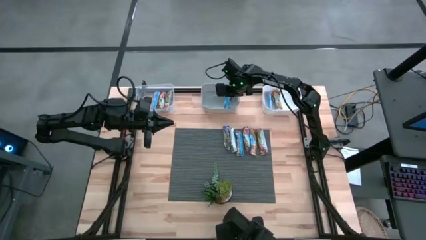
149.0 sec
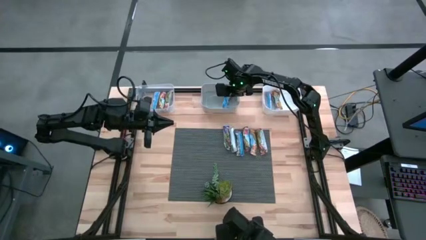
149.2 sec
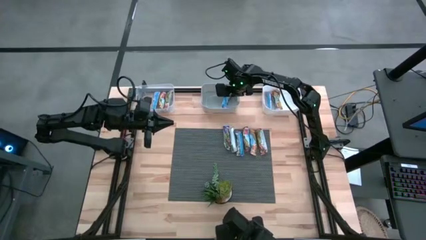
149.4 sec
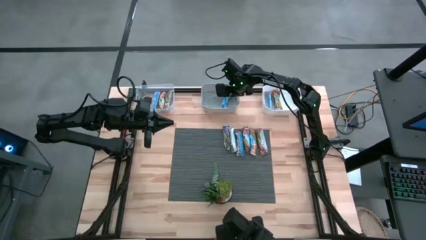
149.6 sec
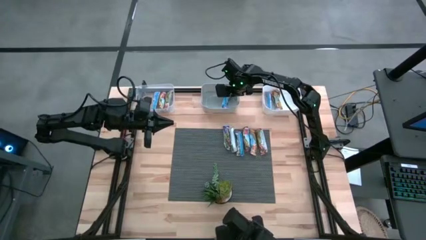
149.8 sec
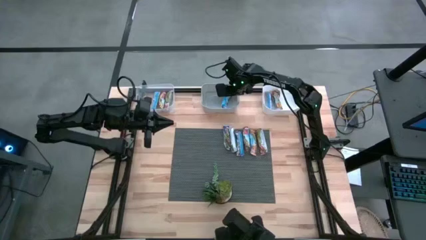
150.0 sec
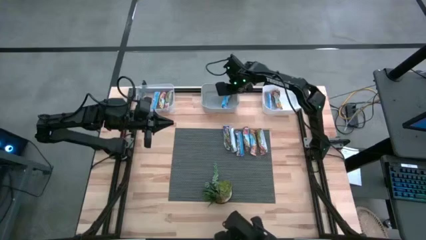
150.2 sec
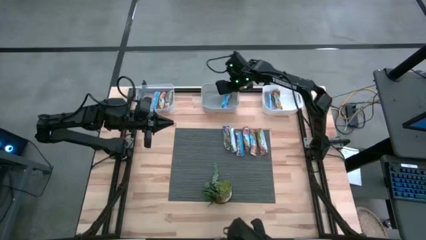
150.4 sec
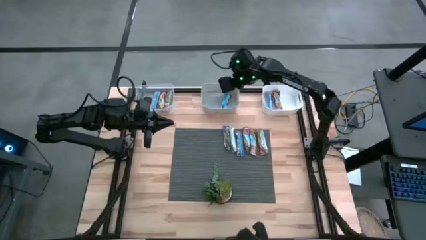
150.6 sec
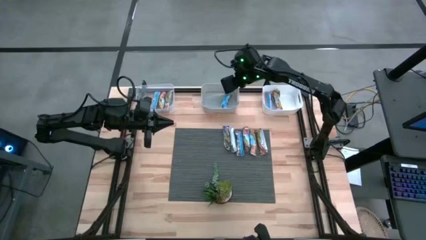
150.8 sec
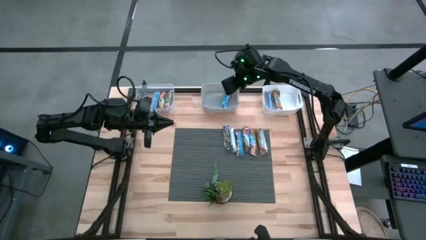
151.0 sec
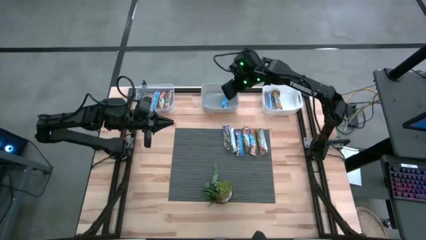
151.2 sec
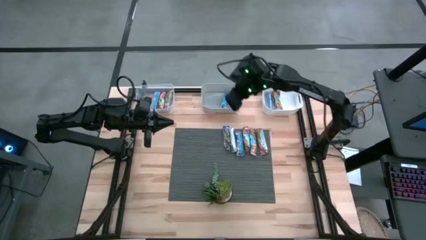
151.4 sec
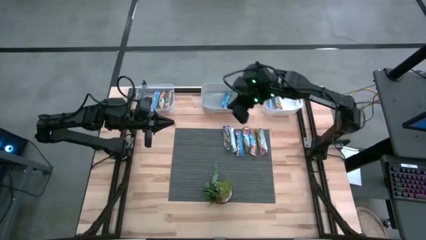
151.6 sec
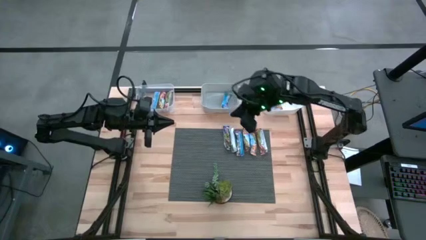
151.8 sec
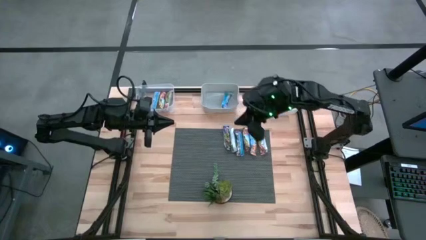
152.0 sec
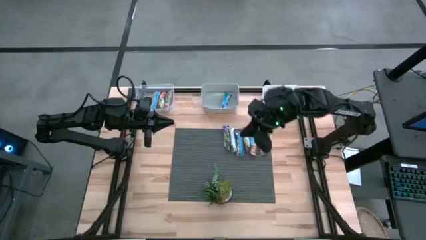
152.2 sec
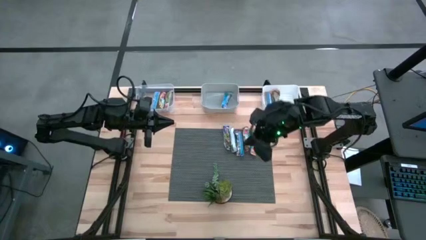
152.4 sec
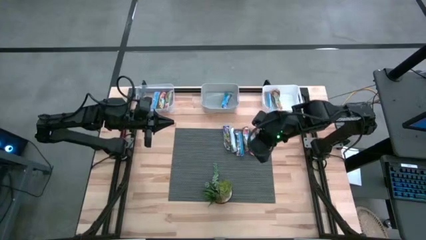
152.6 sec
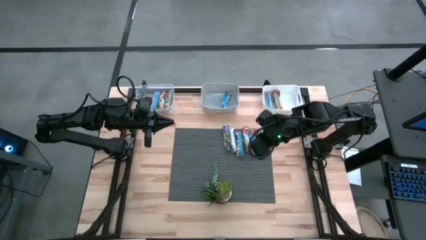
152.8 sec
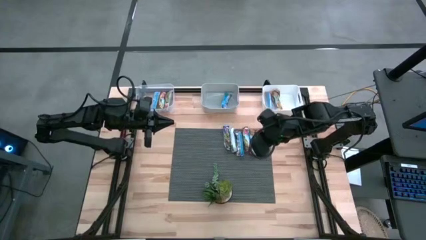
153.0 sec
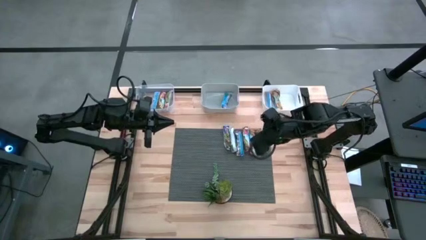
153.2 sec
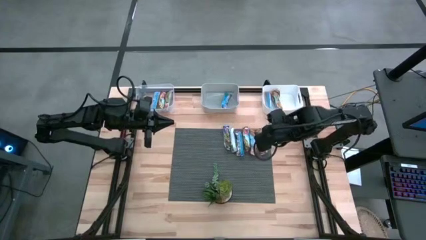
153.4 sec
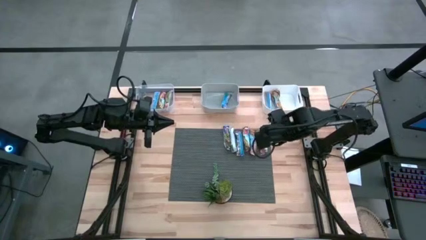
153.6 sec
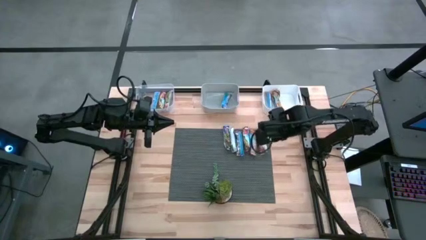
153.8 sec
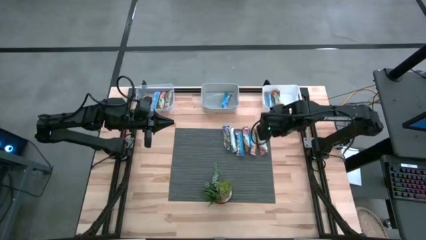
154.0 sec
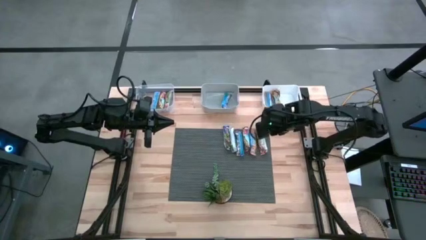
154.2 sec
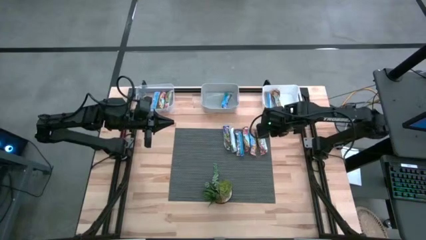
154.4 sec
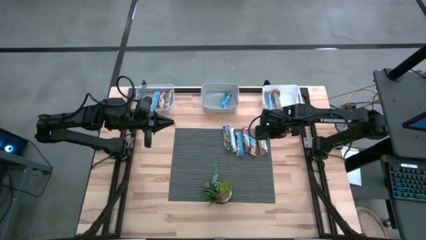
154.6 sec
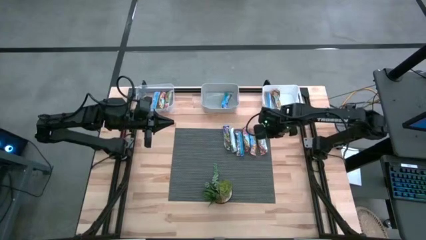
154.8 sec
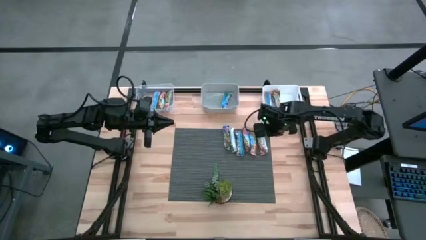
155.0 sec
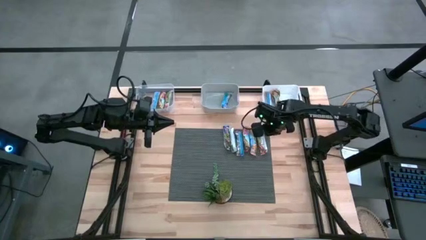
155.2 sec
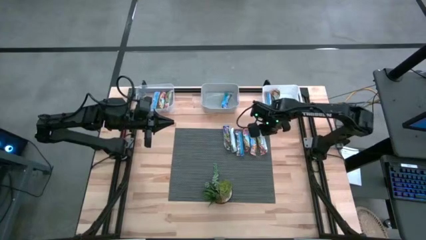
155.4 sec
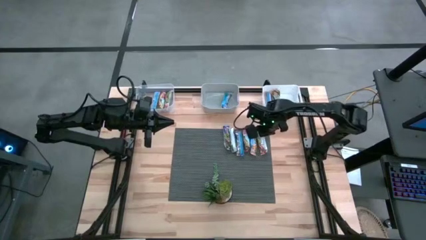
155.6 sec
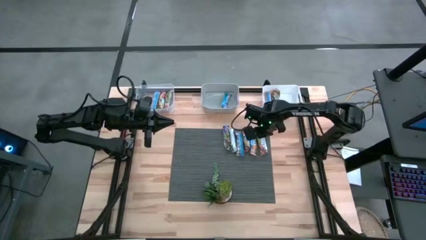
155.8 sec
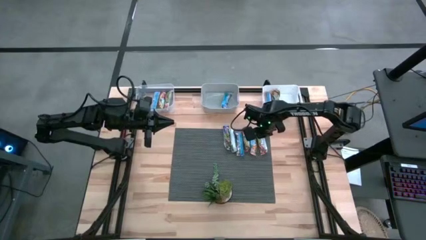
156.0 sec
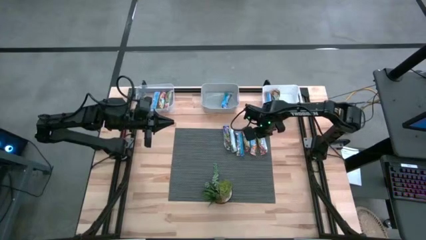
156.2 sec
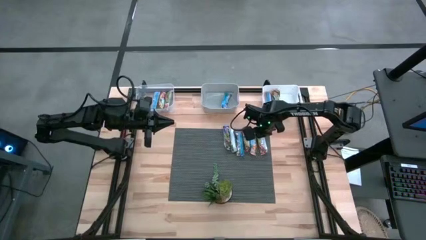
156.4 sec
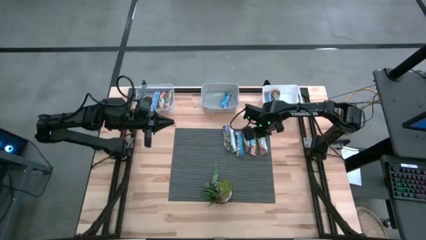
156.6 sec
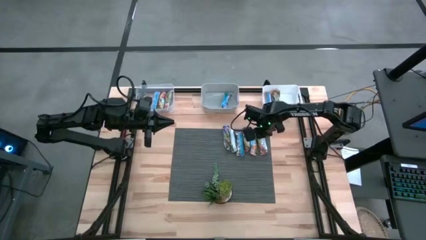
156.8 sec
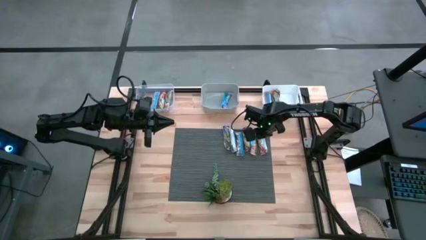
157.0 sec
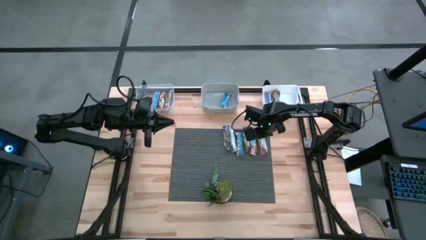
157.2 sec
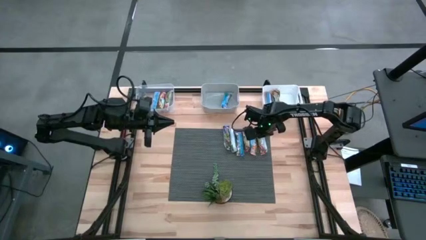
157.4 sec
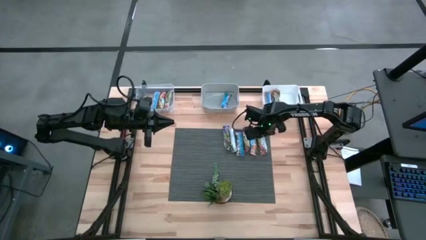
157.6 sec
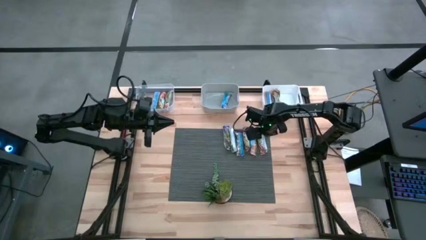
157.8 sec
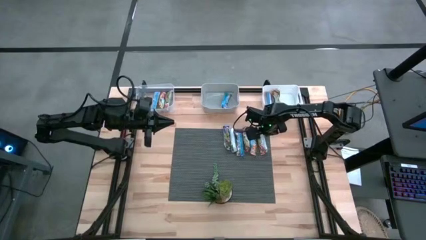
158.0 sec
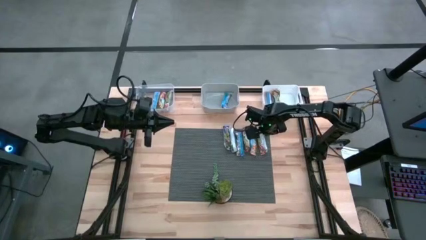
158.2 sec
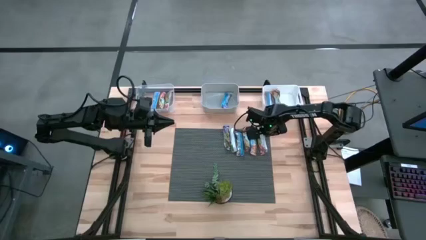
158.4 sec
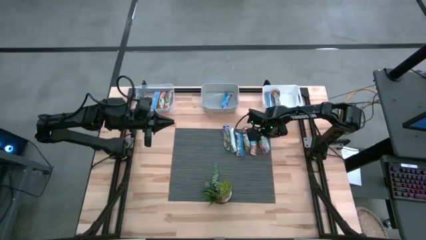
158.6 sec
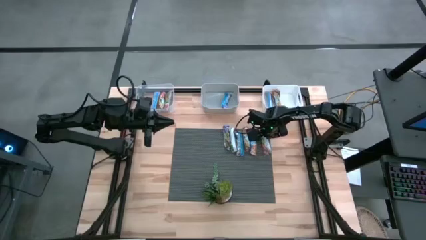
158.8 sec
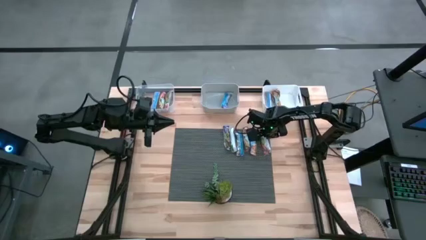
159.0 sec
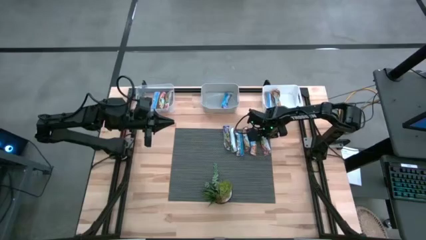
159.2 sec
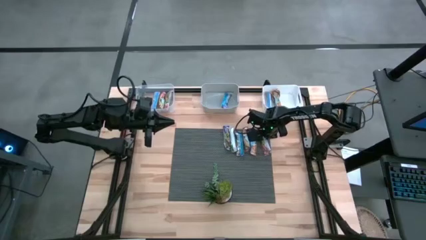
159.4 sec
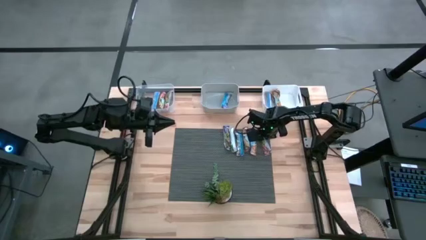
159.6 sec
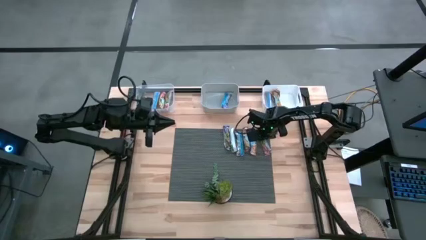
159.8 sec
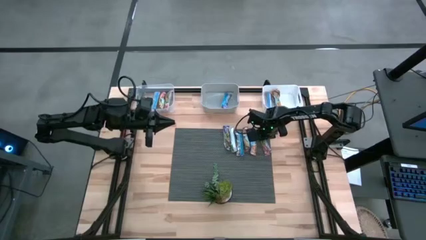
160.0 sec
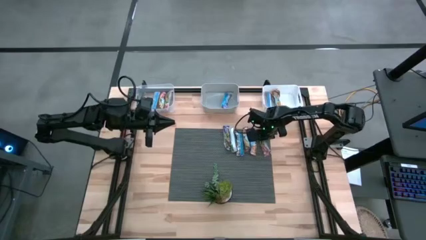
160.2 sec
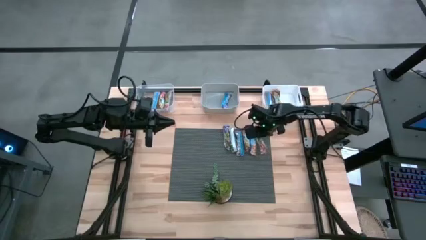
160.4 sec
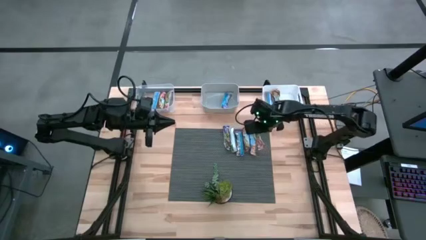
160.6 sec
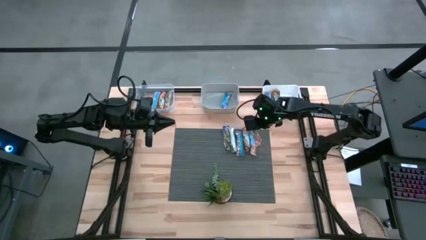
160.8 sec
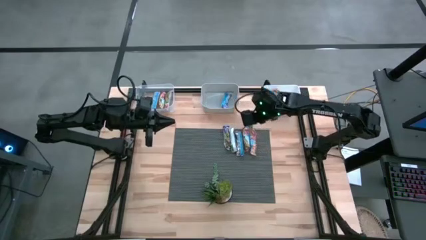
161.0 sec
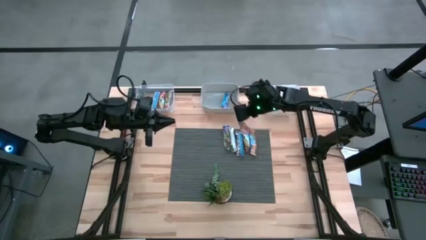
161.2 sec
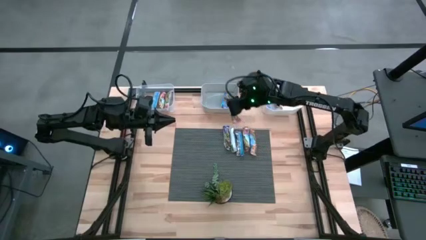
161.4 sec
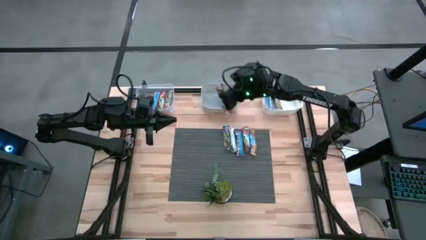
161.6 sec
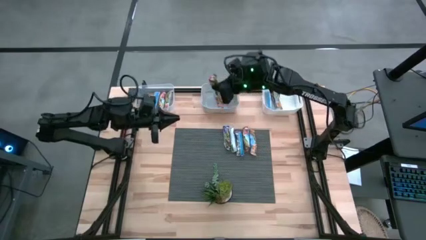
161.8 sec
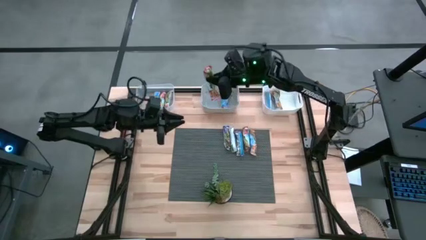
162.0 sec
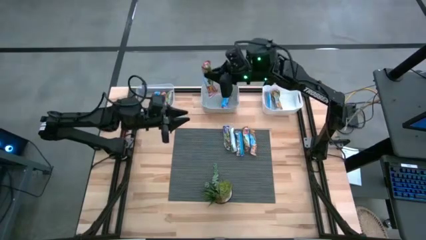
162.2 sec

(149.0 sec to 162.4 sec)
Task: Pick and place Granola Bars by type
Put the red granola bar into the transparent bin

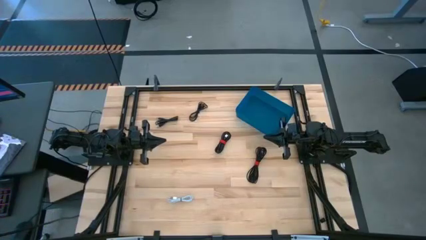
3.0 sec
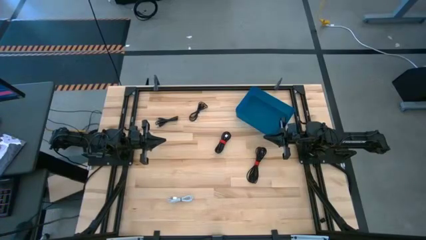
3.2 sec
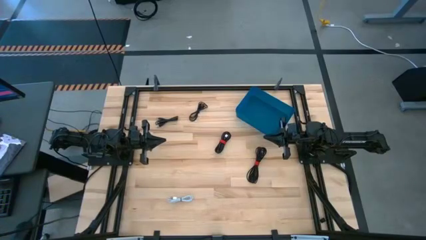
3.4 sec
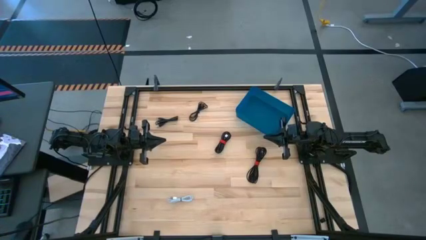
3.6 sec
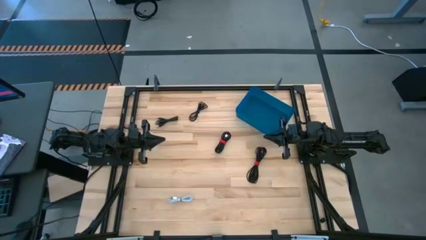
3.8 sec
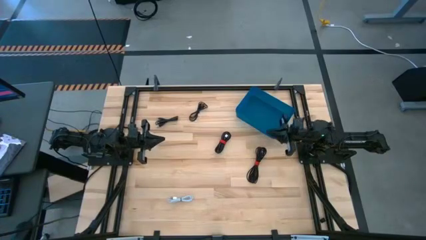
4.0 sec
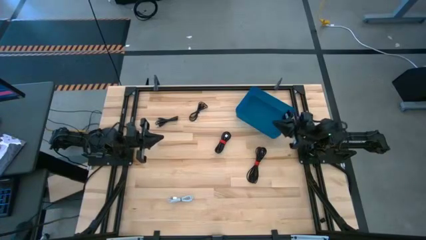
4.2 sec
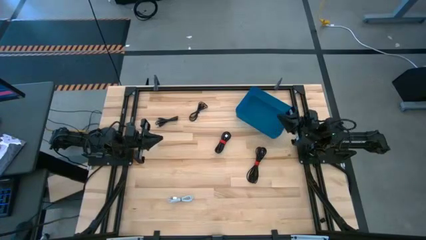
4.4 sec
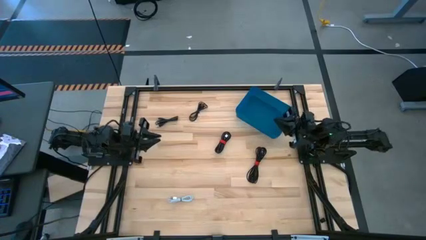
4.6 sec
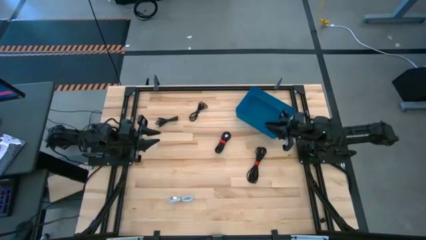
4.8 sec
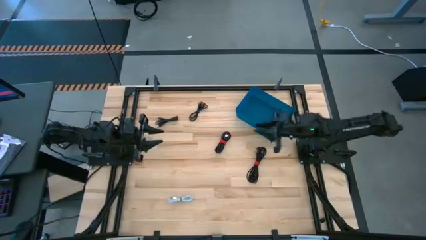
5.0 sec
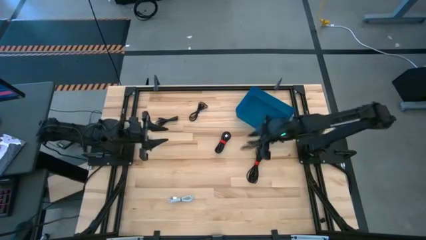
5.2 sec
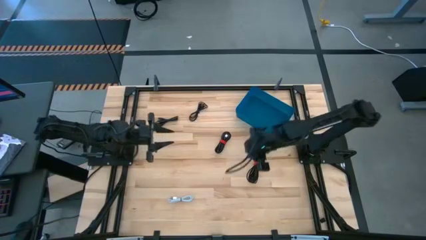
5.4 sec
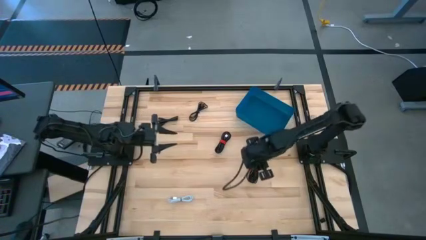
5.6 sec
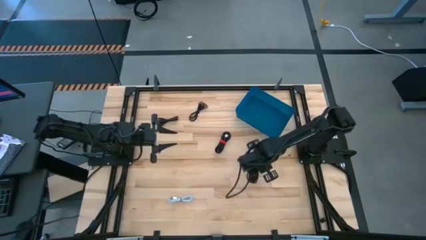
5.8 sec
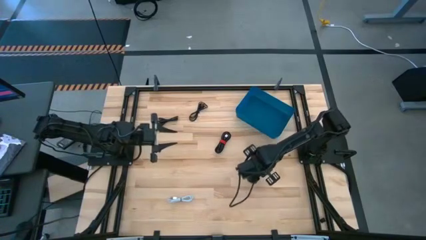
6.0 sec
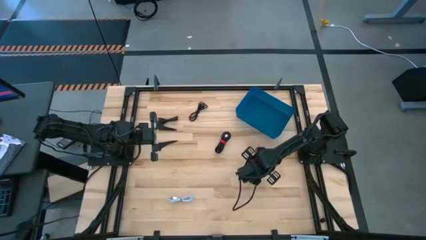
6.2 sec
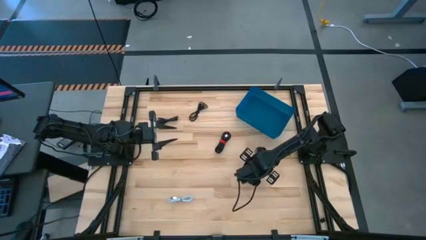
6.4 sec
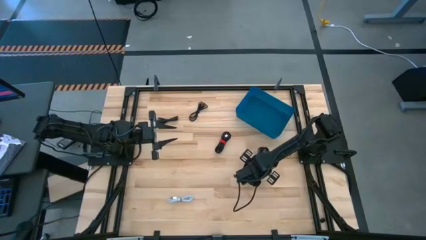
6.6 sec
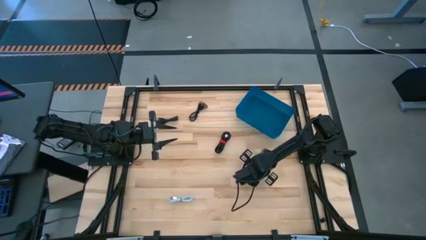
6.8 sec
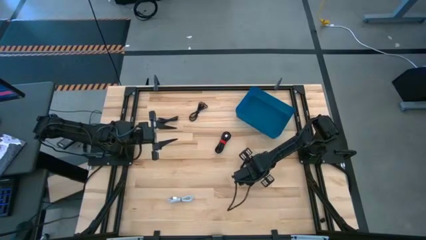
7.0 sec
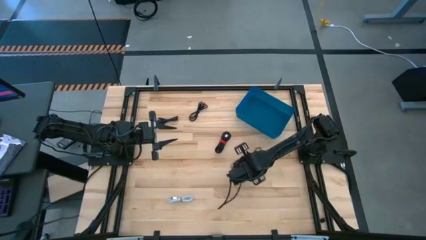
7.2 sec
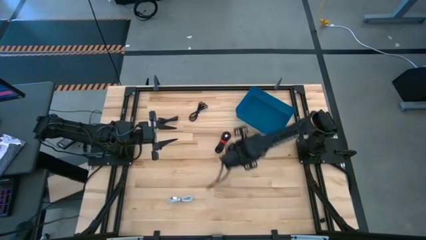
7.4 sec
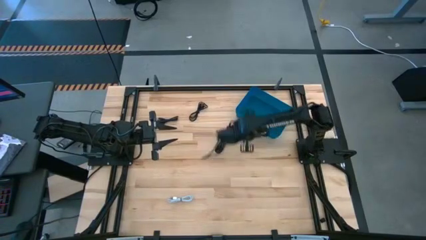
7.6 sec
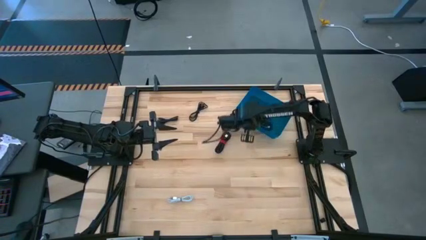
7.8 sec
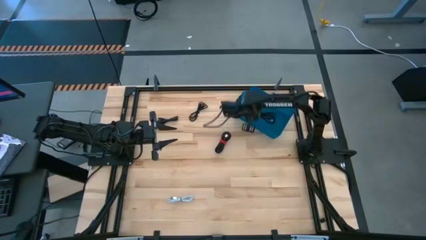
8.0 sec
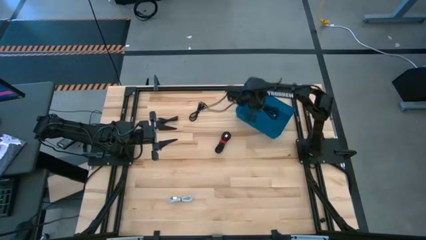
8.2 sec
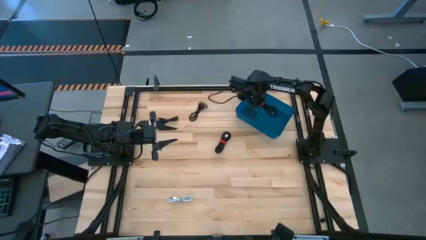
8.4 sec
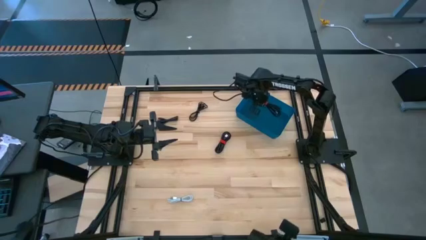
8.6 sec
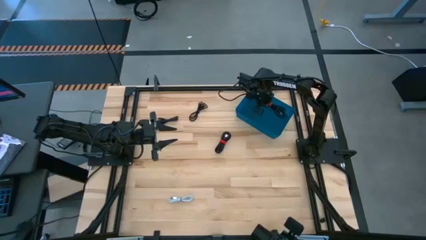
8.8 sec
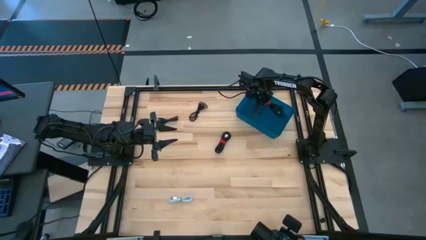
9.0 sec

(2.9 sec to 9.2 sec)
Task: Pick and place USB-C Cables
Put the right black charger cable into the bin
